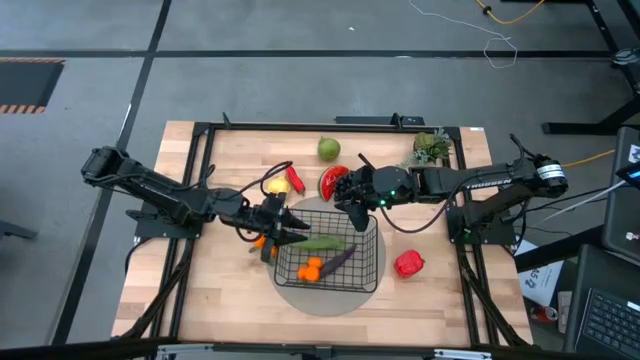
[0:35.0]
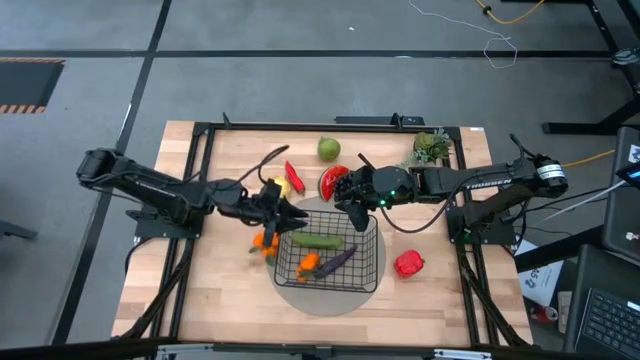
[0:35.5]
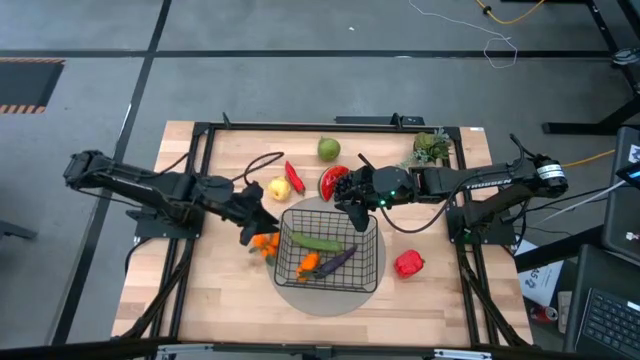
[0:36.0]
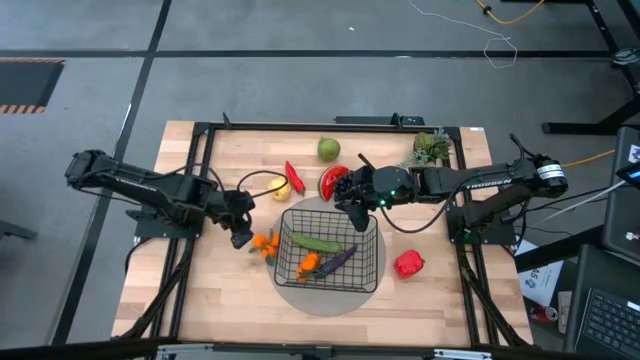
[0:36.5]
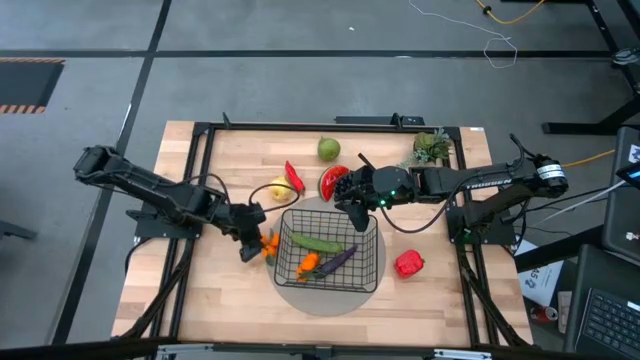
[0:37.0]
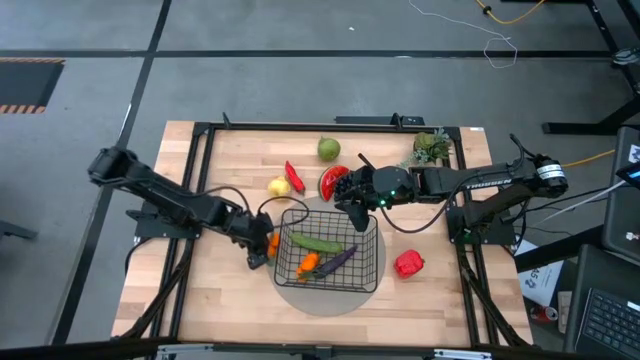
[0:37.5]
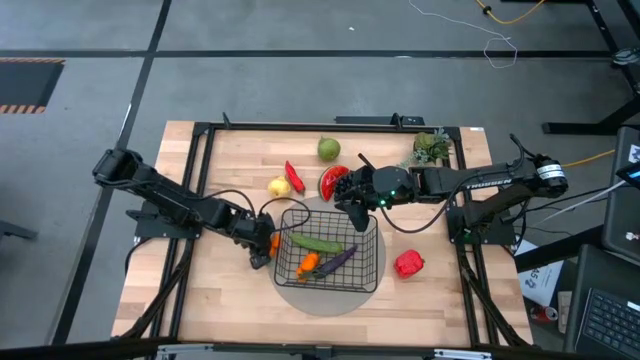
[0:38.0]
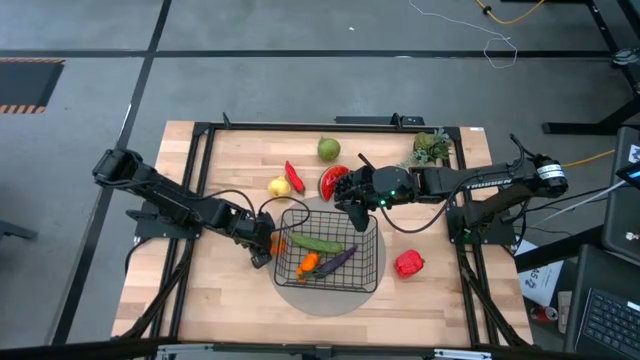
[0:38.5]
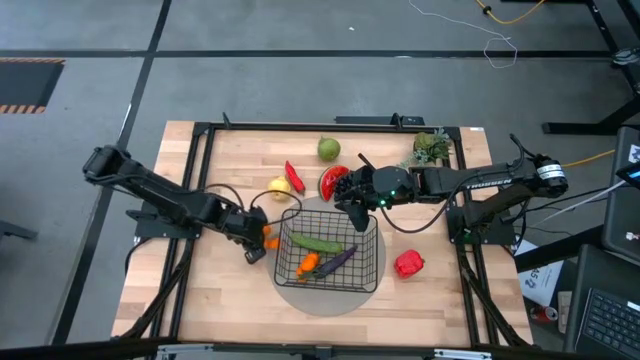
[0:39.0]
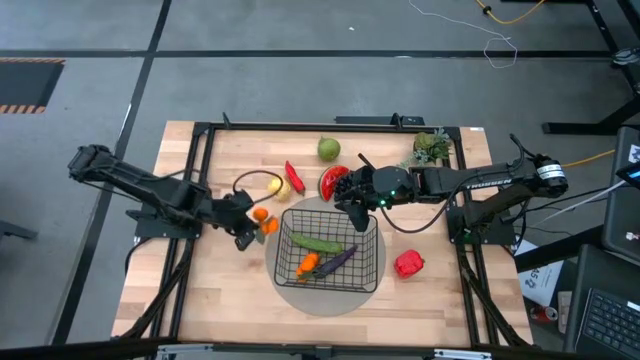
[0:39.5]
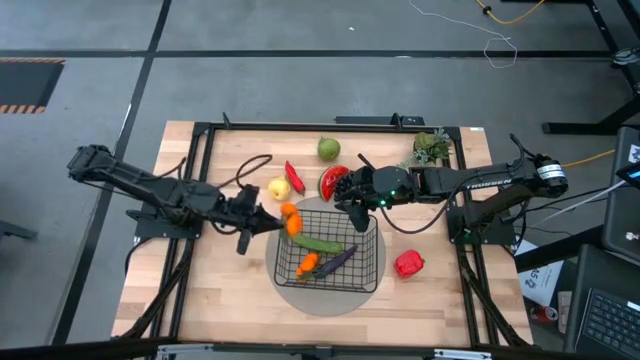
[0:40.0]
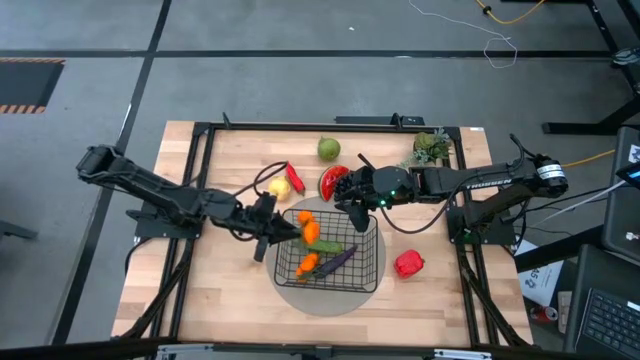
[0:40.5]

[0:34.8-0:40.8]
Task: Build produce basket
Put the oranges tangerines into the black wire basket

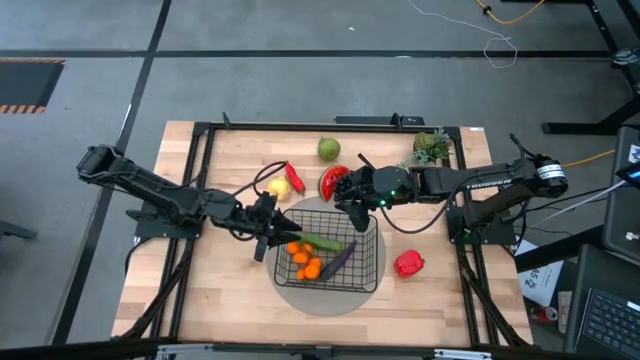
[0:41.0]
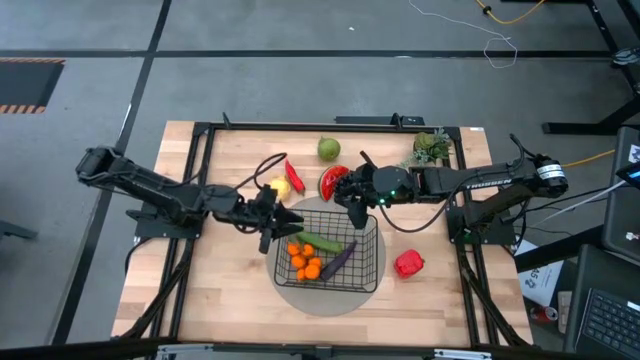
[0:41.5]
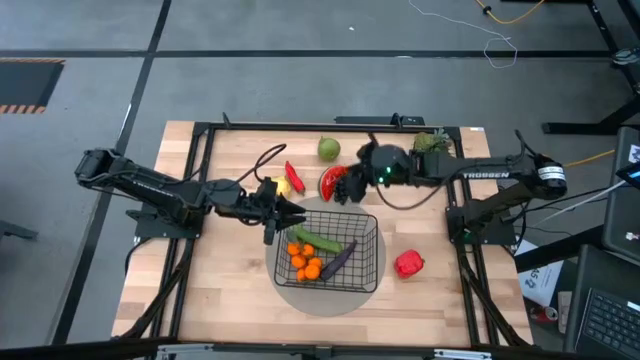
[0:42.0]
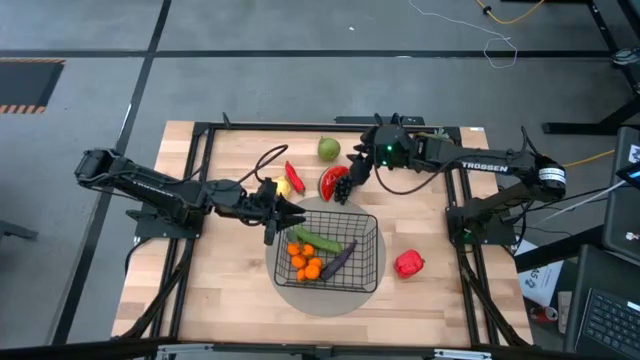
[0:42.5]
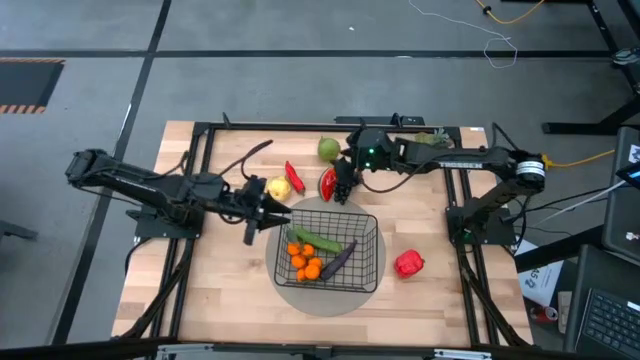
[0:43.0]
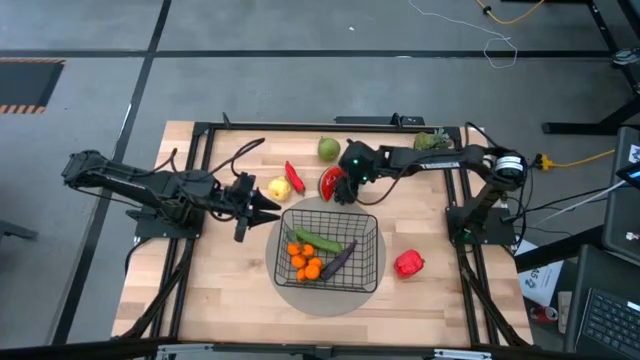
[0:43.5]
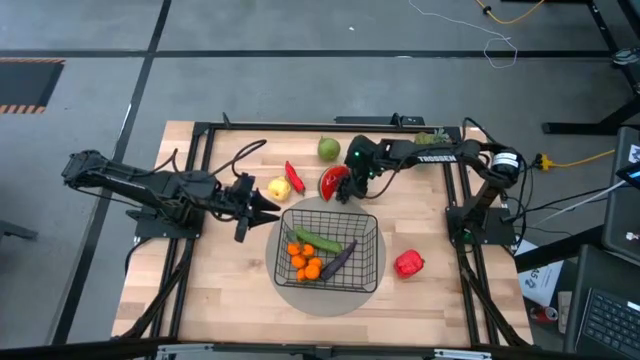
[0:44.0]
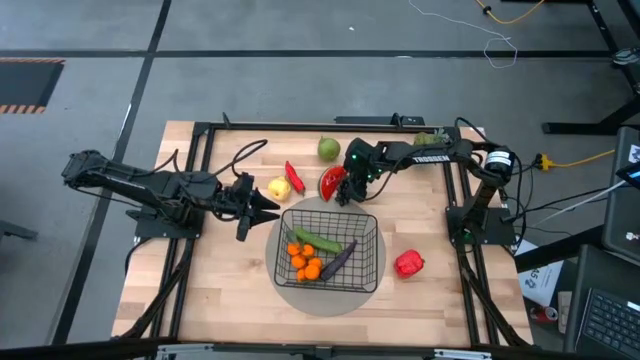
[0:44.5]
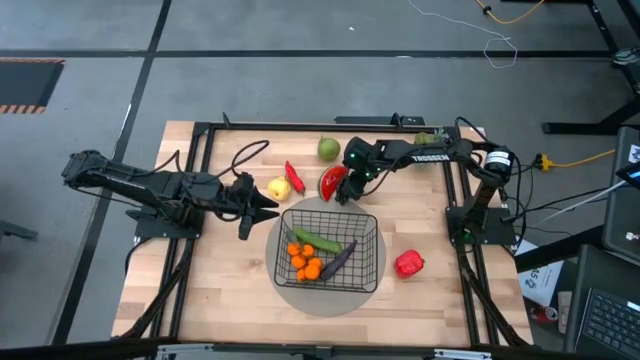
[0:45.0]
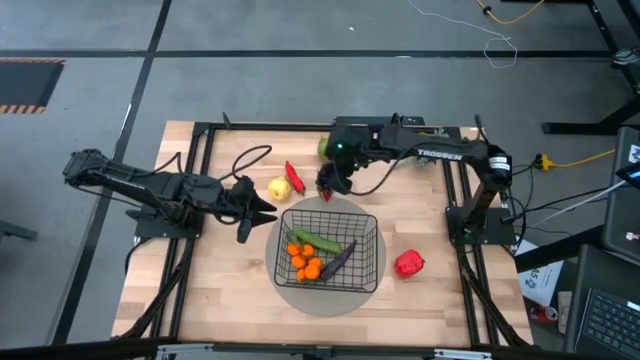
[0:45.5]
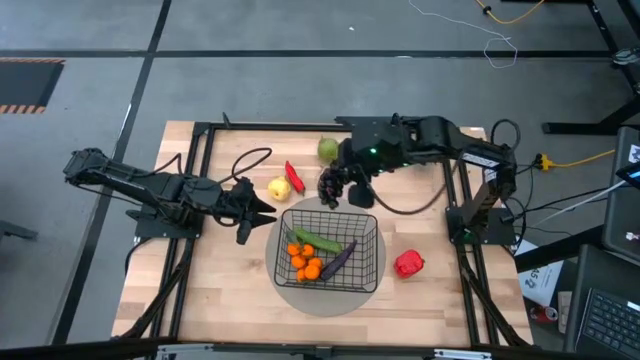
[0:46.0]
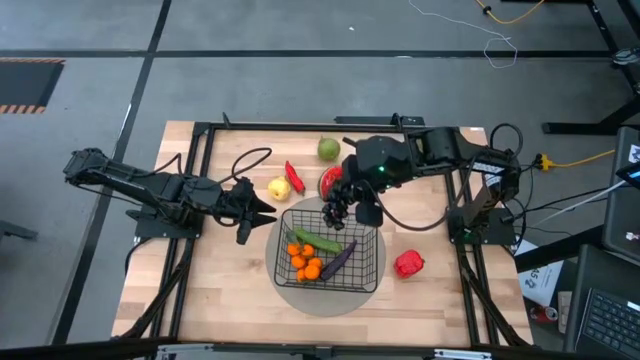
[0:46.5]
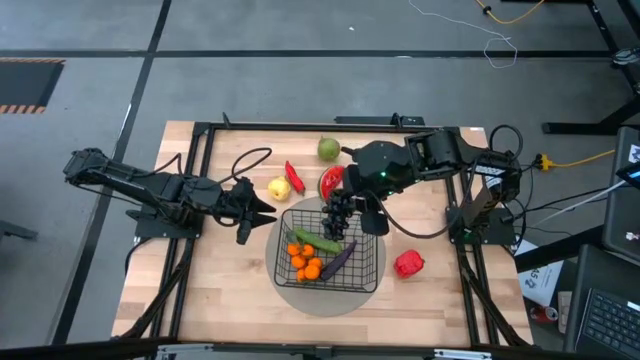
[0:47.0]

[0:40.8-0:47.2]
Put the violet grapes into the black wire basket

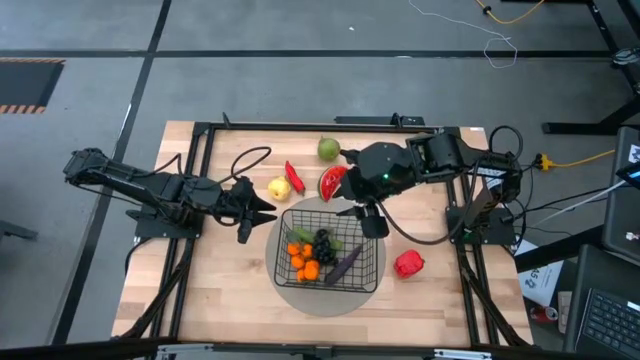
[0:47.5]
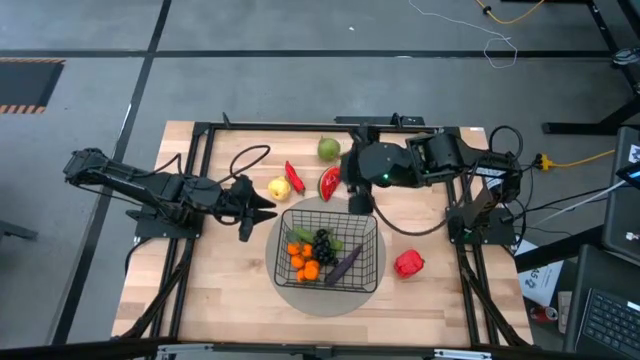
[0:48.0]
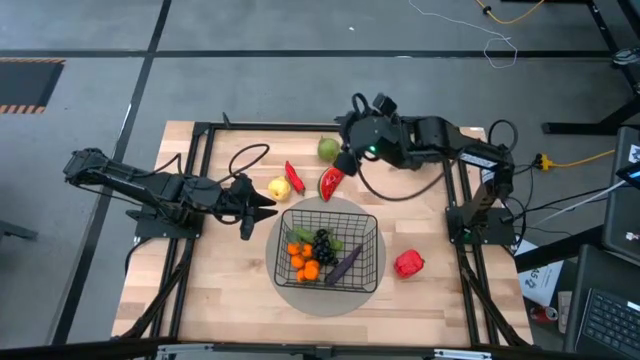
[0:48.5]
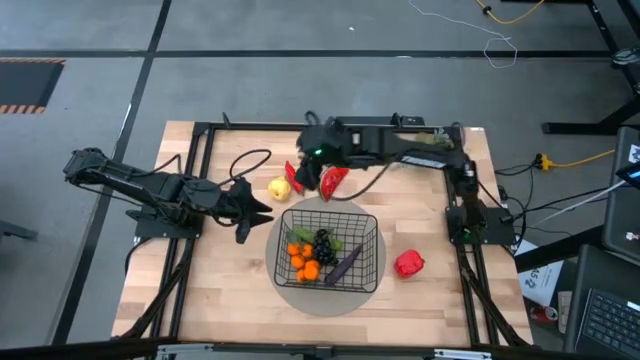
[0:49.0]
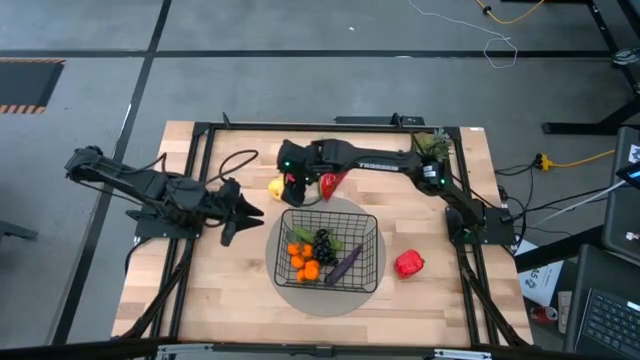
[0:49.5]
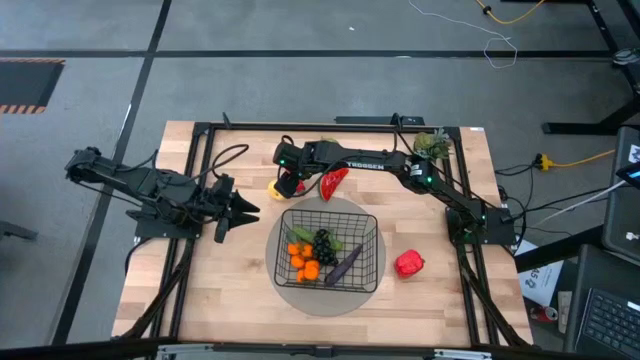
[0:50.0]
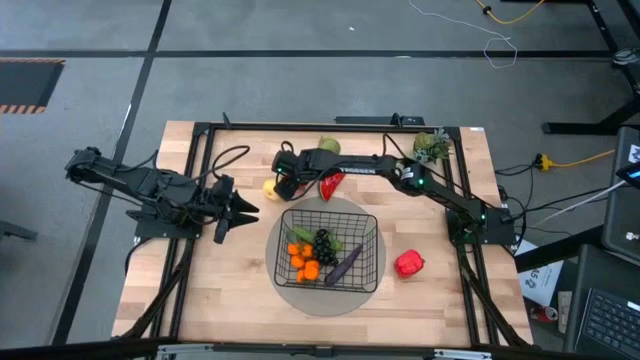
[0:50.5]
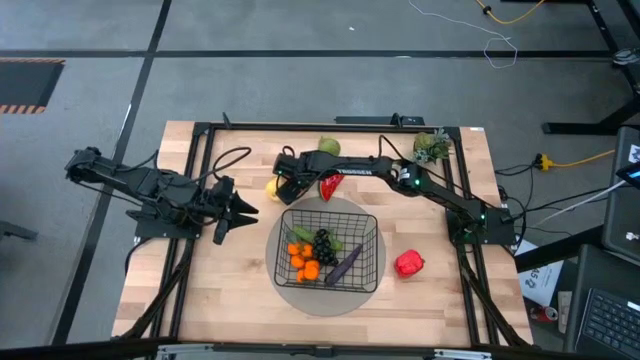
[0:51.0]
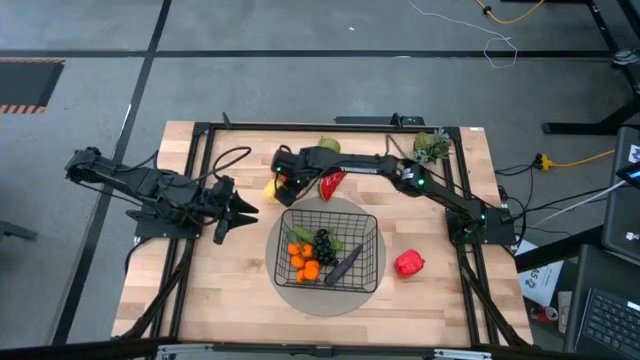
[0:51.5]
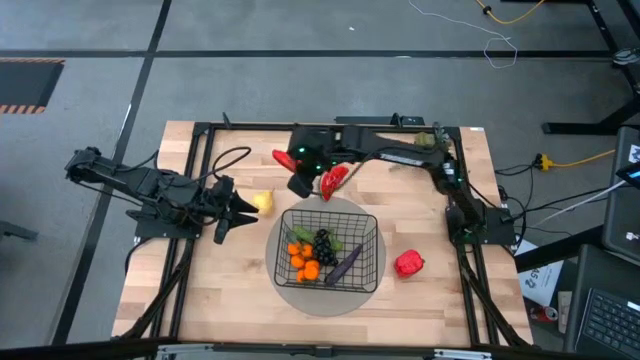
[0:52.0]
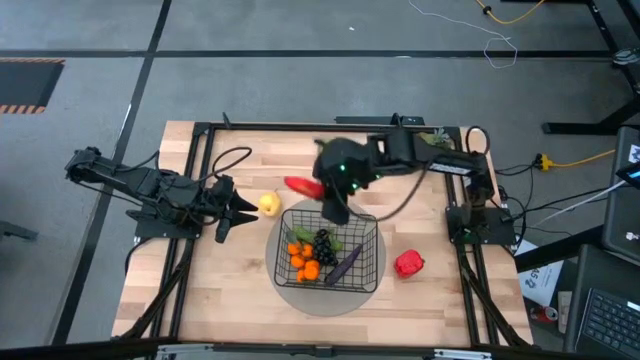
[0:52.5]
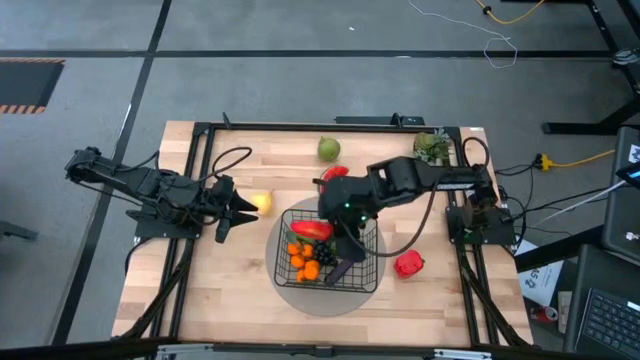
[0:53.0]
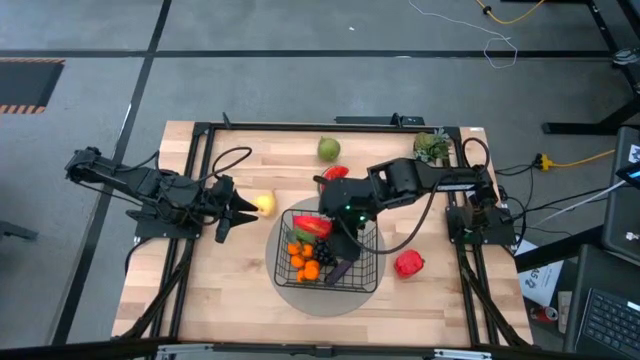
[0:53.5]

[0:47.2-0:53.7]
Put the red chili pepper into the black wire basket

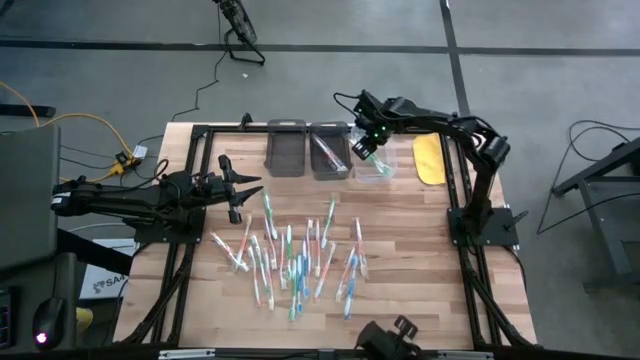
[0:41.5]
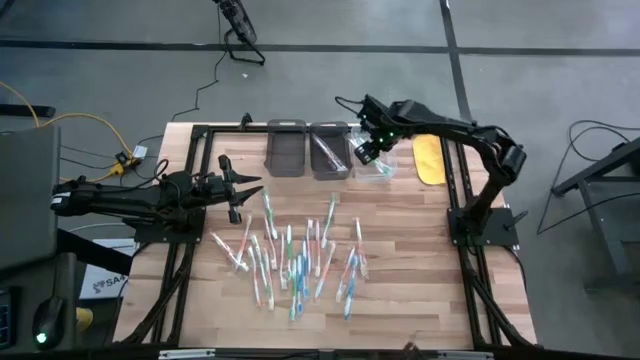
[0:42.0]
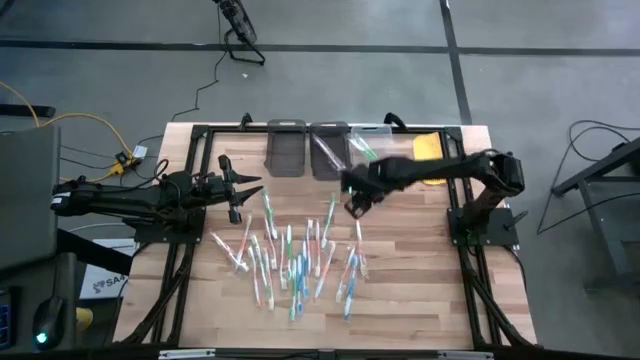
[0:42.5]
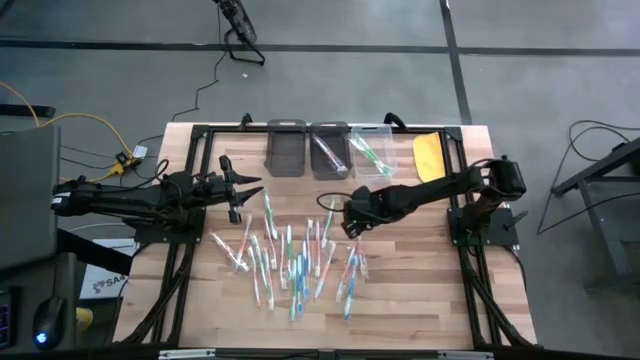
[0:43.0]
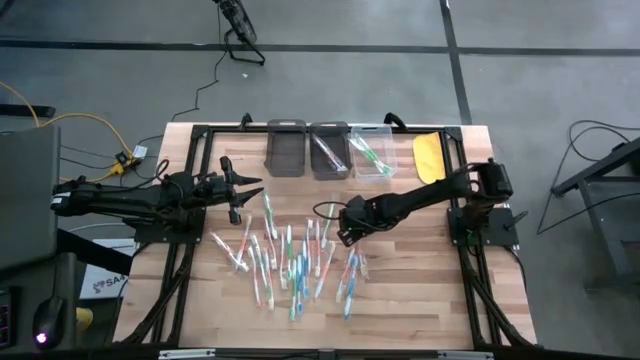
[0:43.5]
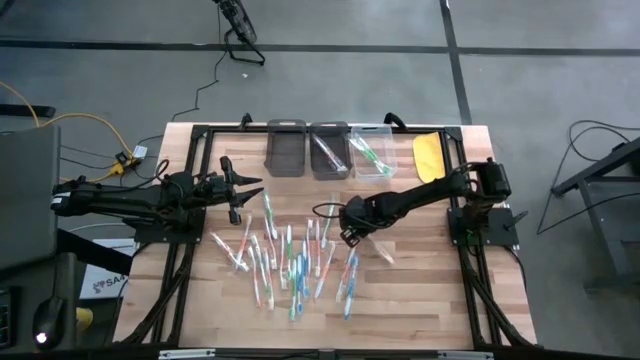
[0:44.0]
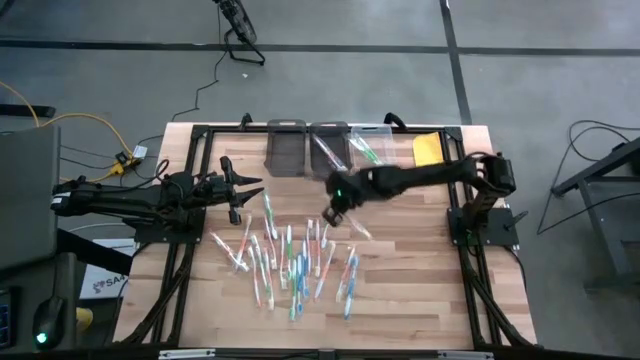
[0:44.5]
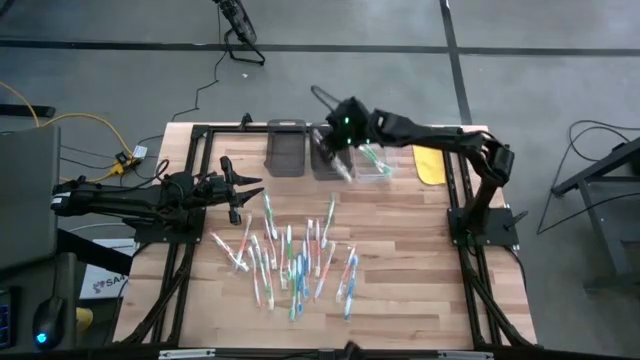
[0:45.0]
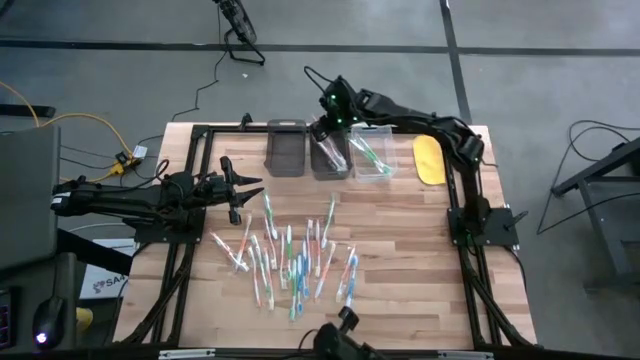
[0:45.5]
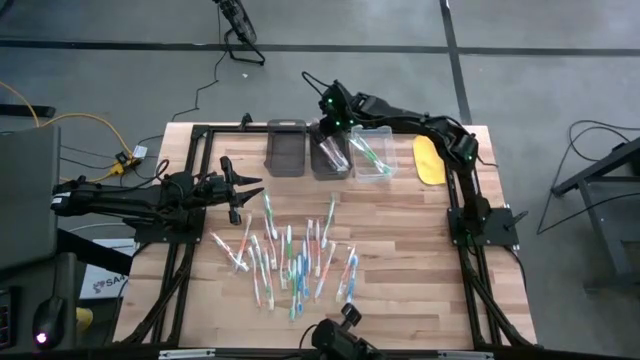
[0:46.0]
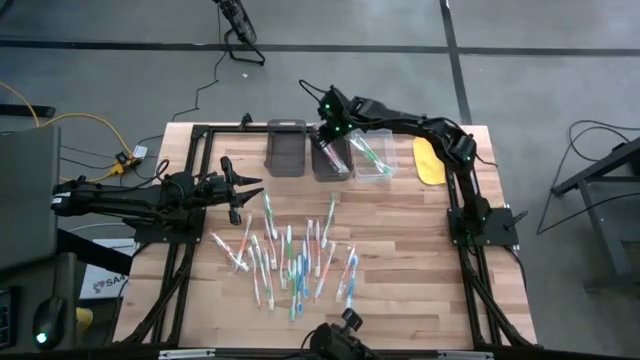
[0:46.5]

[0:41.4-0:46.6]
Task: Pick & Place Toothbrushes
Put the orange toothbrush into the right black bin
